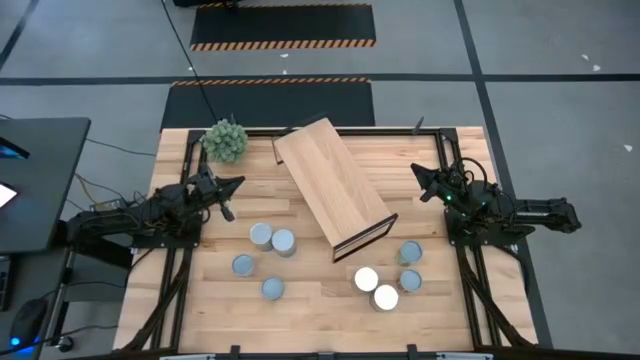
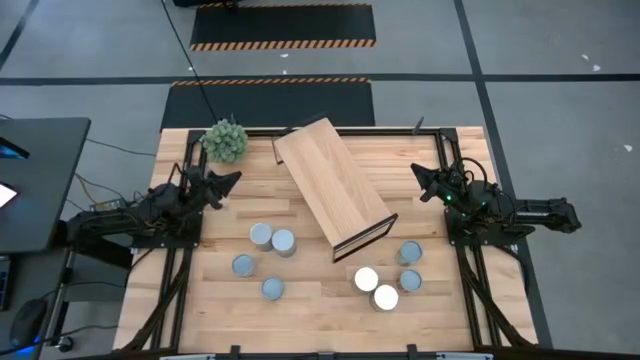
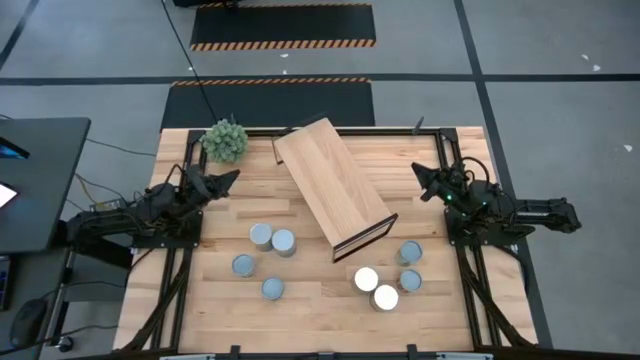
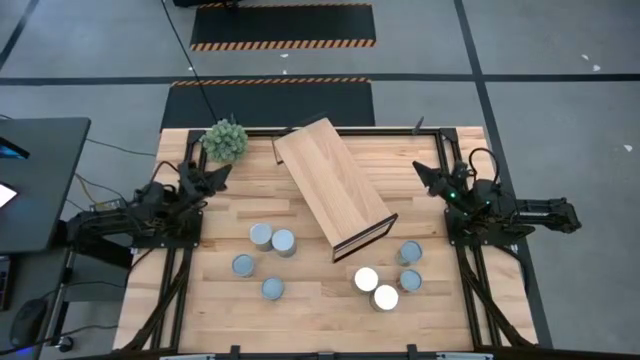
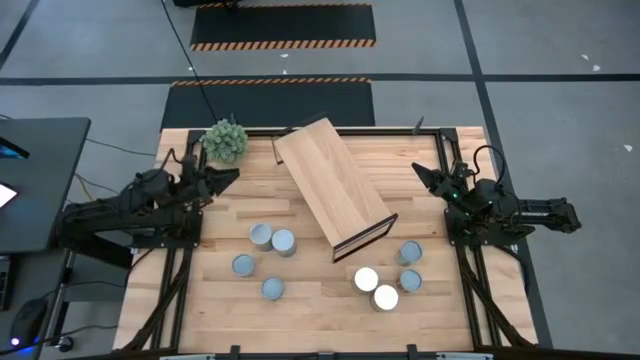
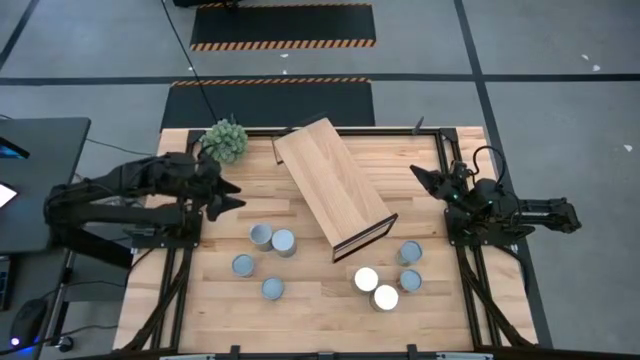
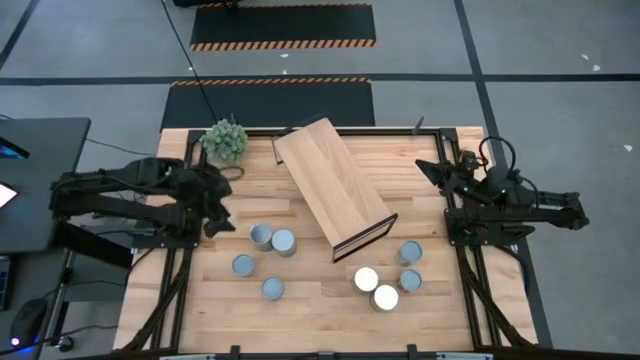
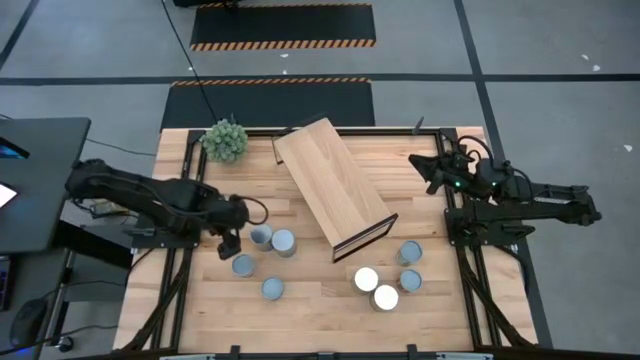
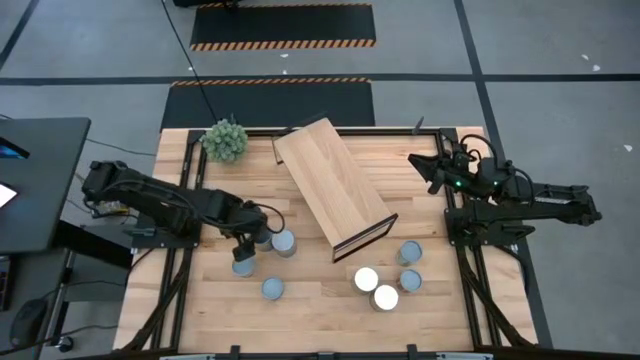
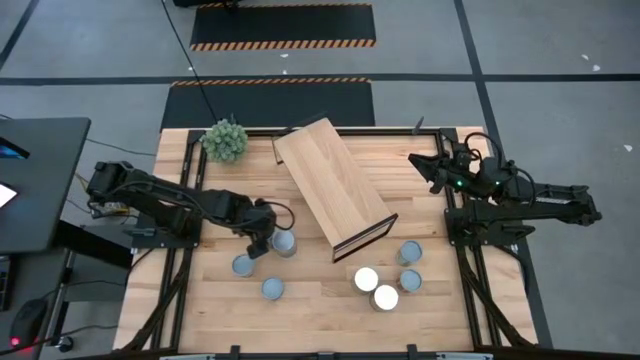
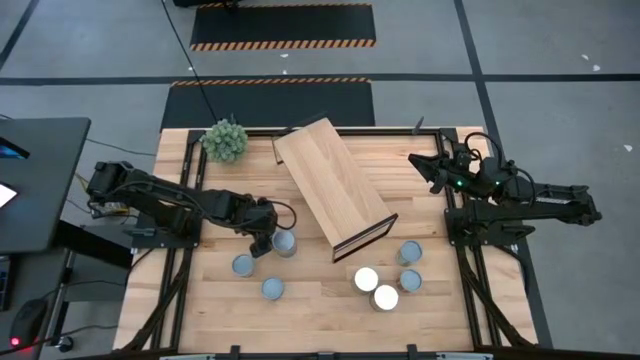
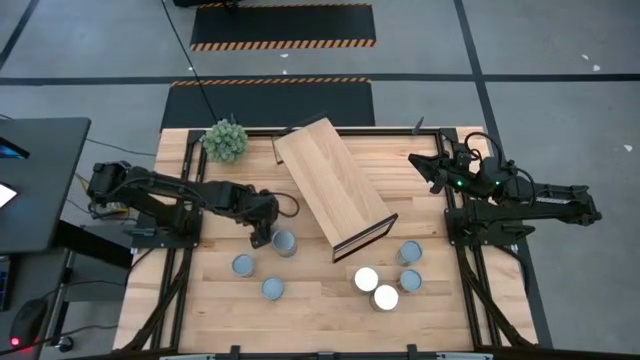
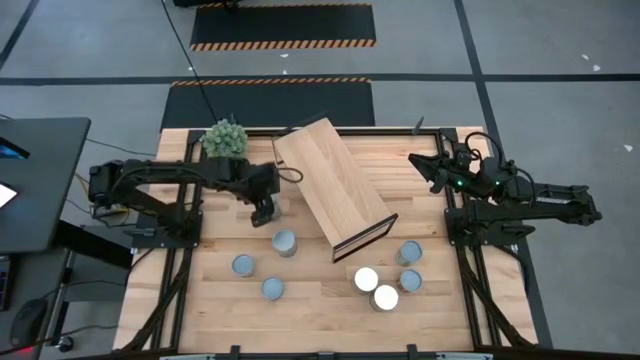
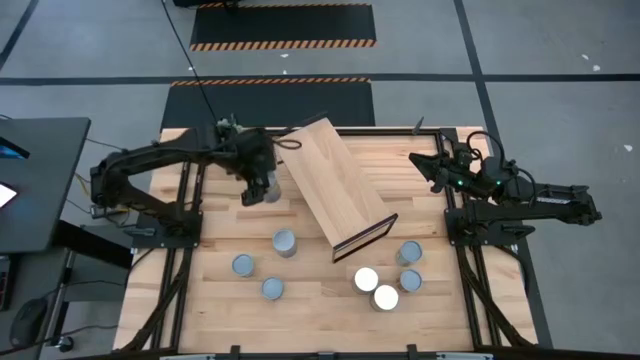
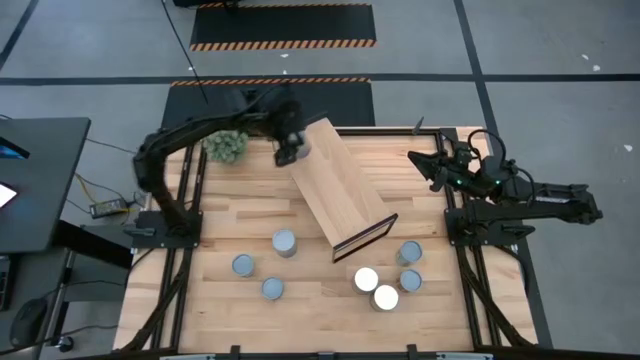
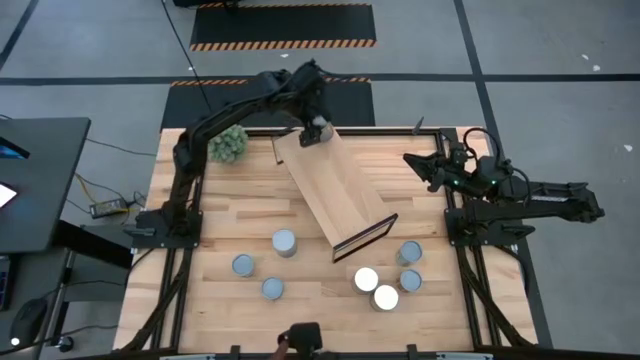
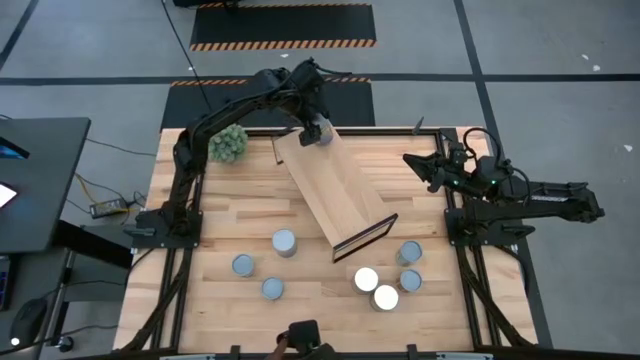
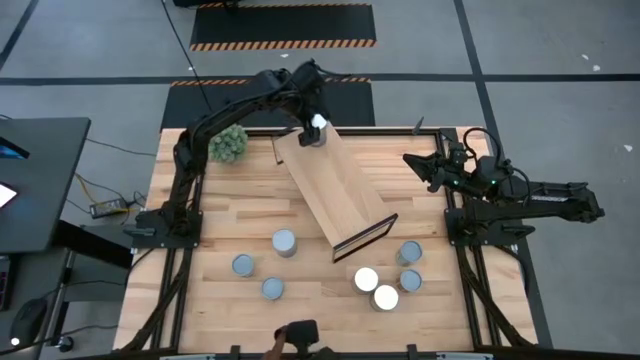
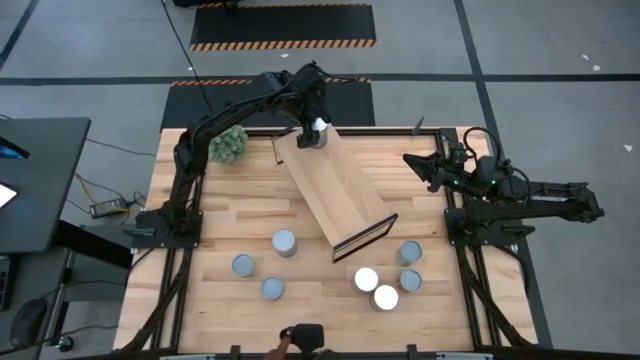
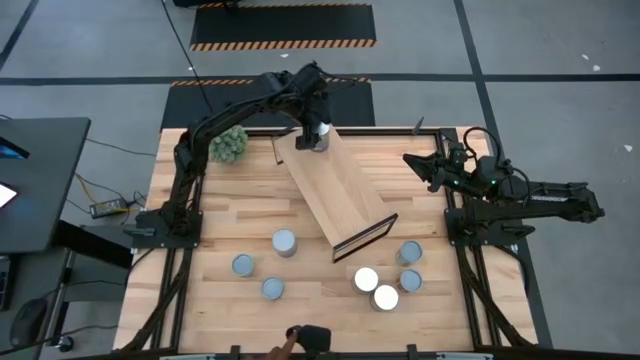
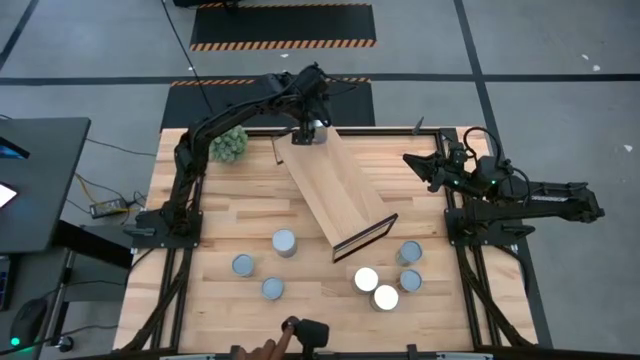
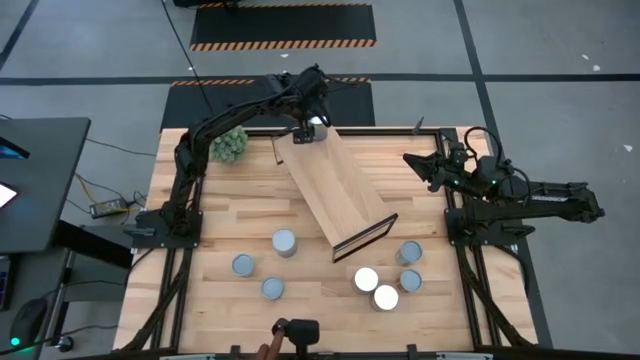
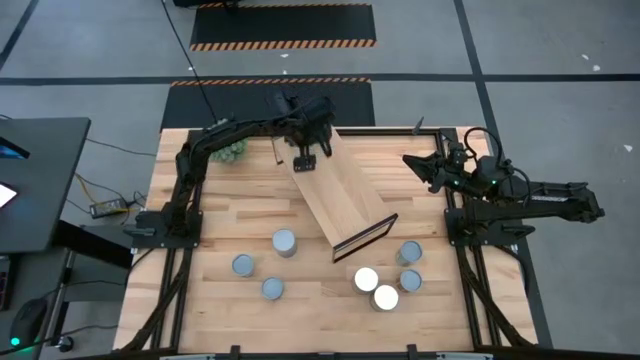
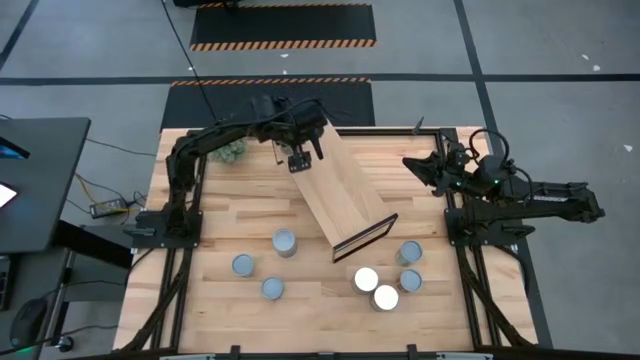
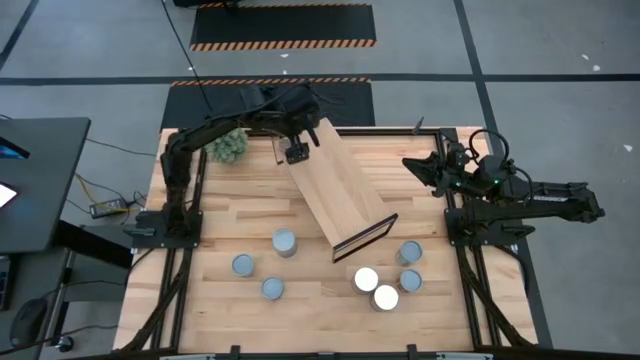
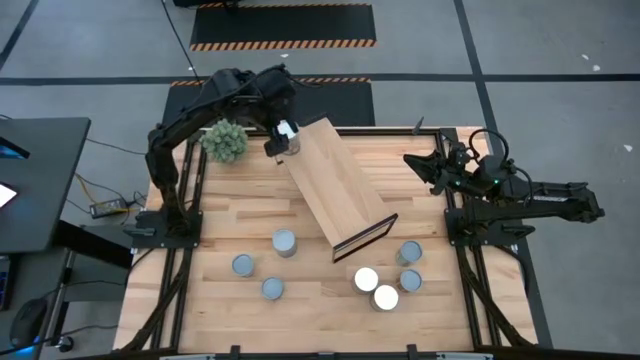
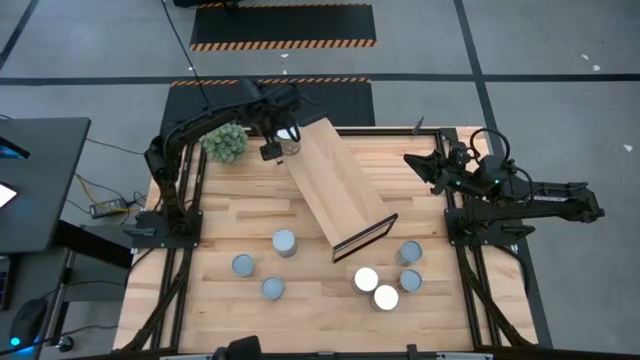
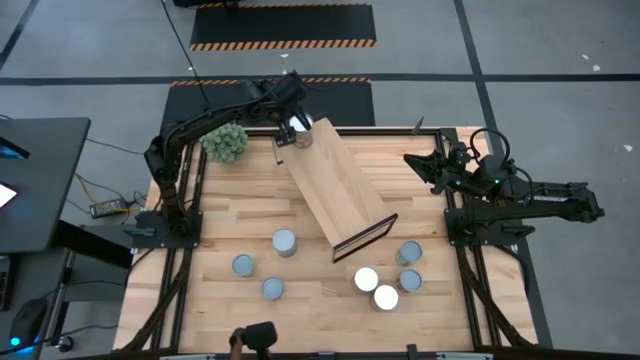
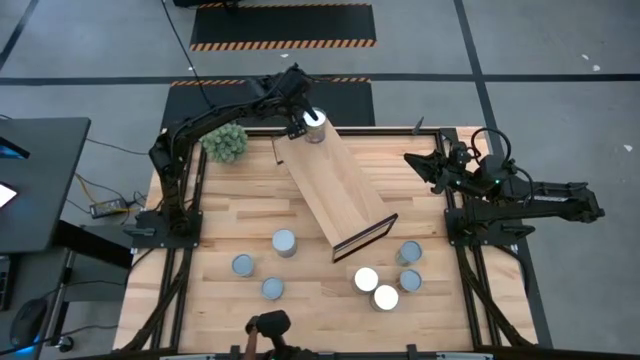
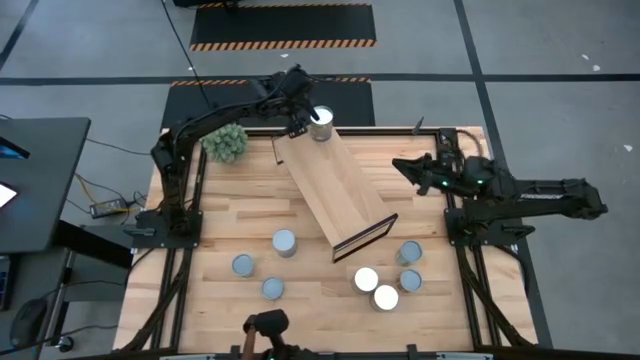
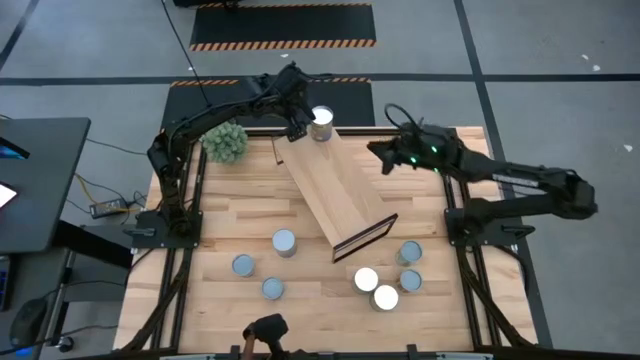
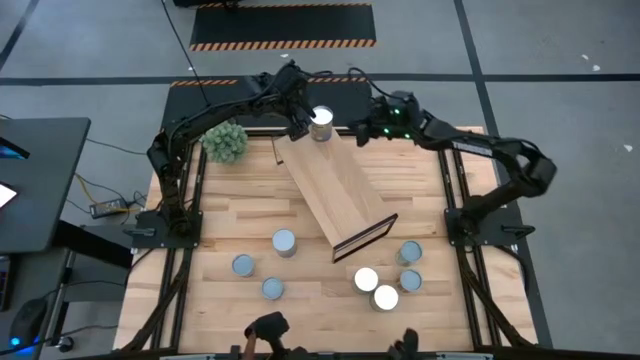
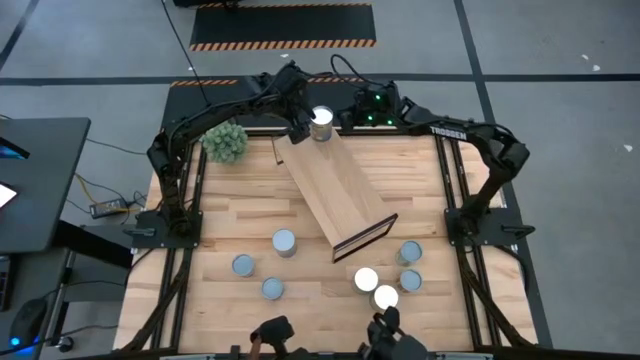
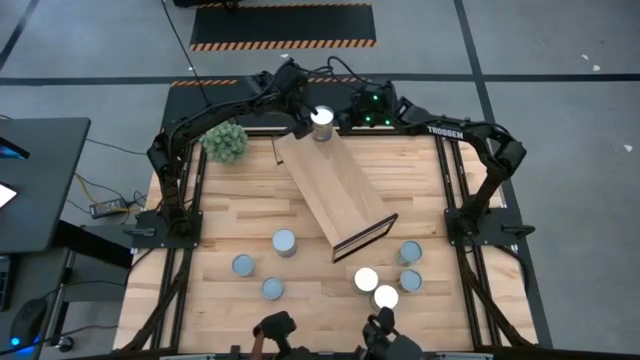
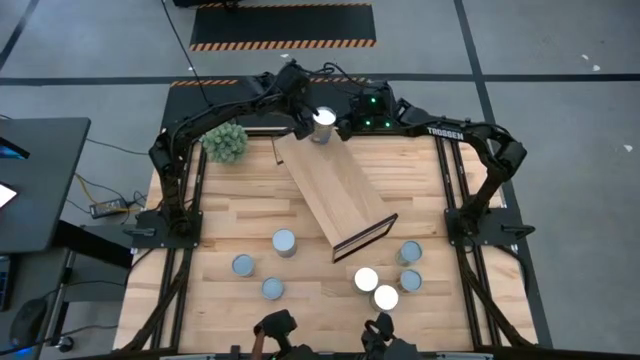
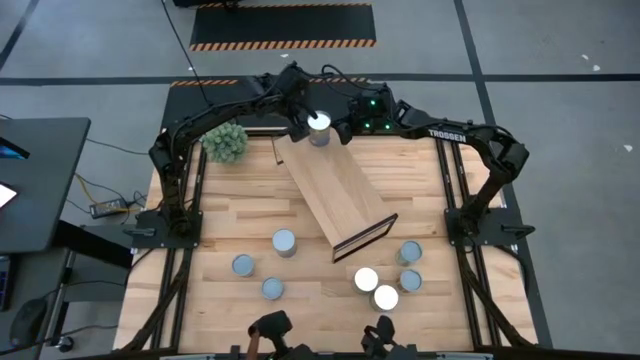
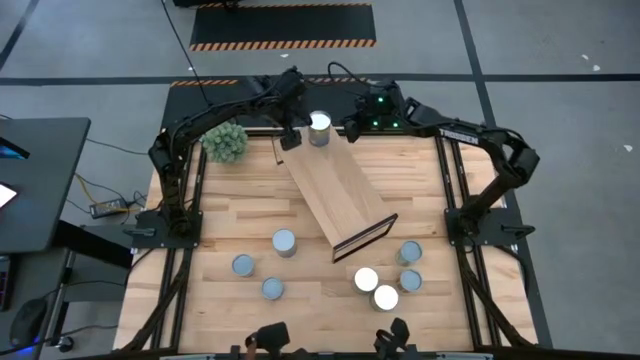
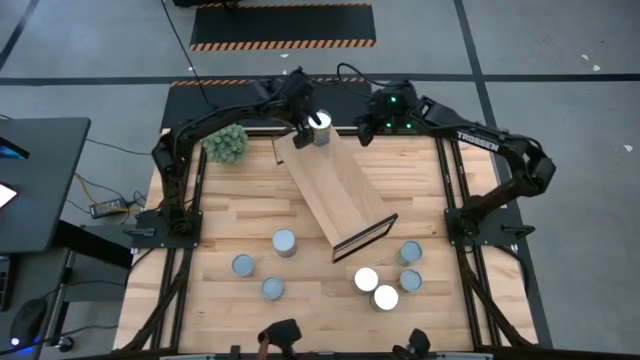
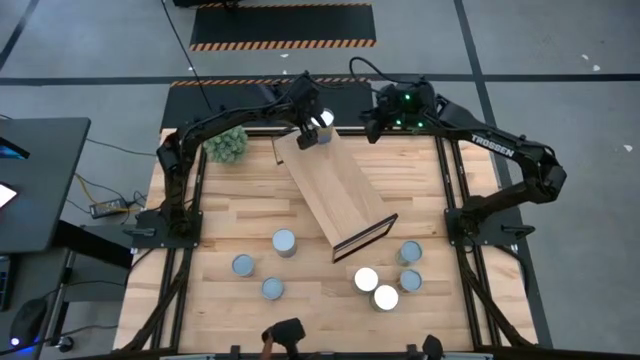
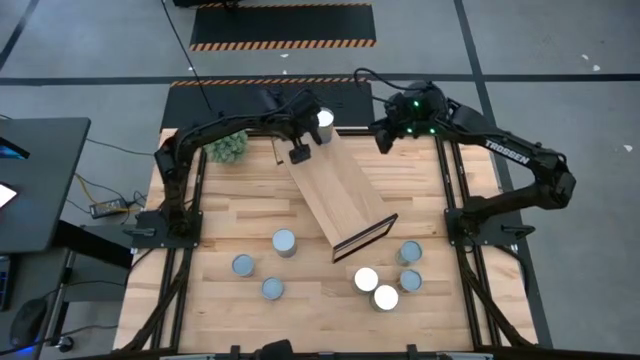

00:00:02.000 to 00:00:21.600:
Task: Pick and place cans onto a shelf
Put the canned peaches on the shelf

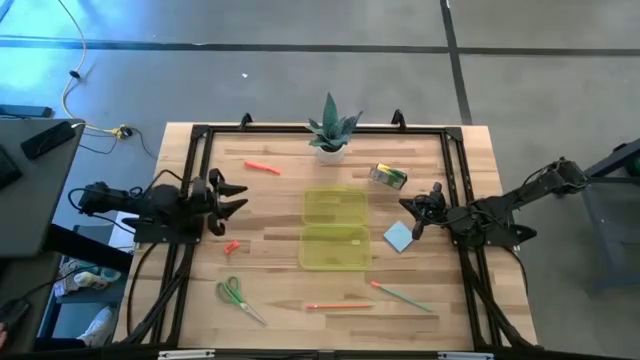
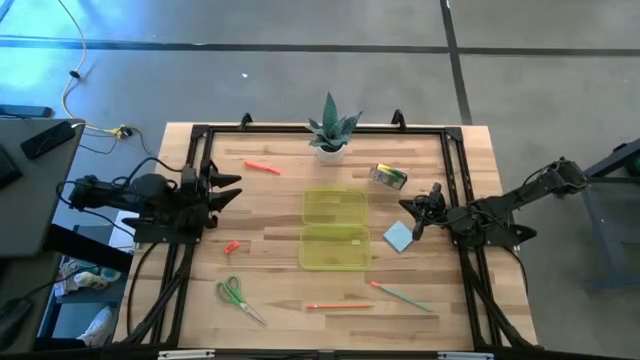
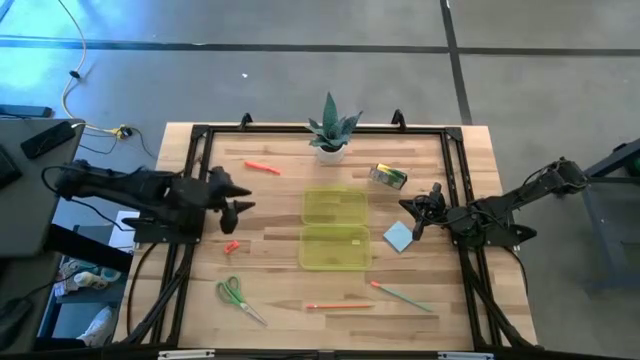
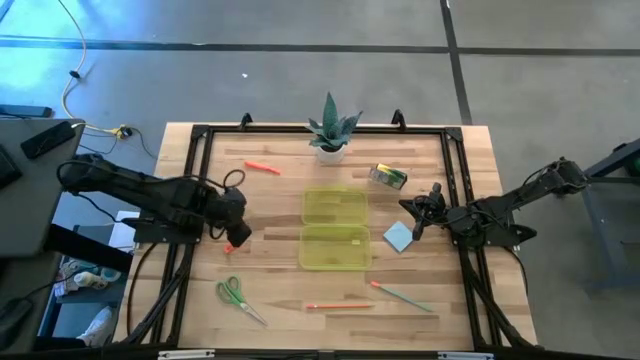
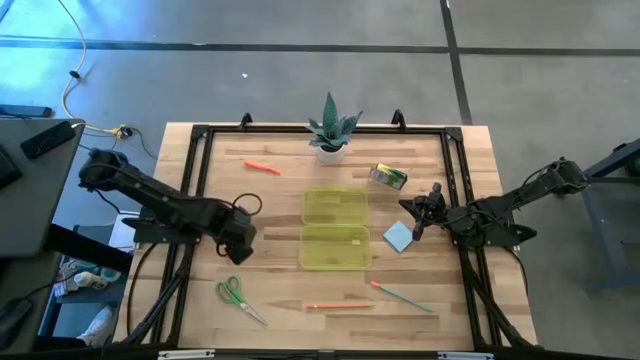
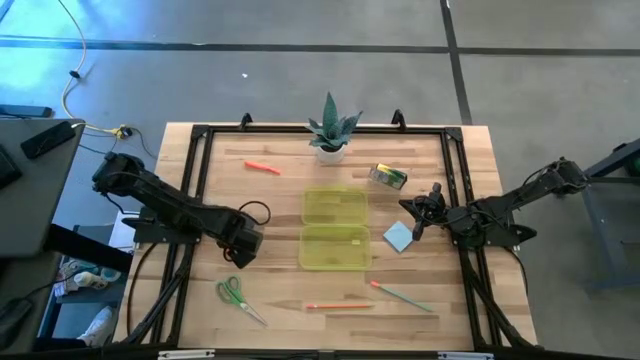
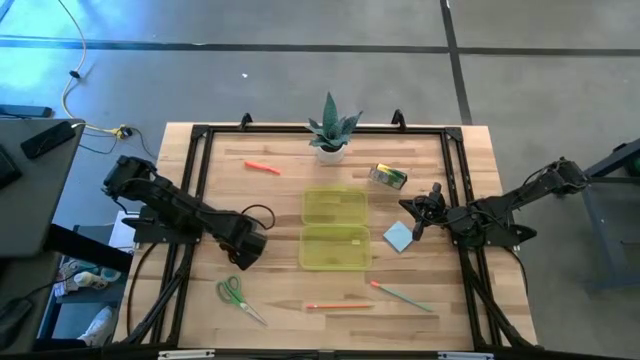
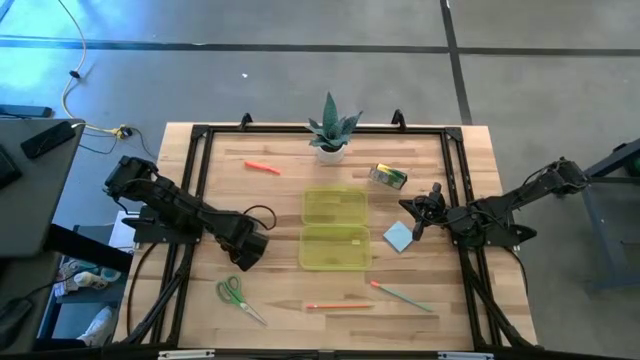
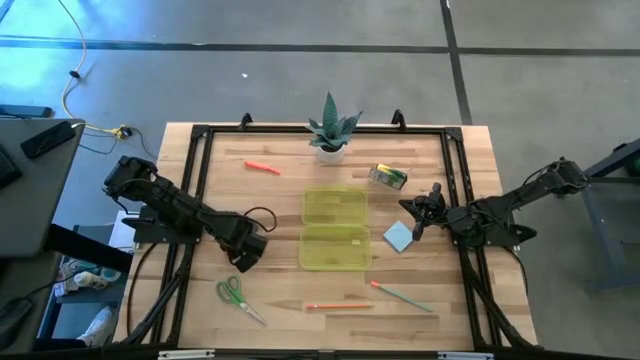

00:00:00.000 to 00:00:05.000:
Task: Pack school essentials
Put the orange eraser into the yellow supply box
